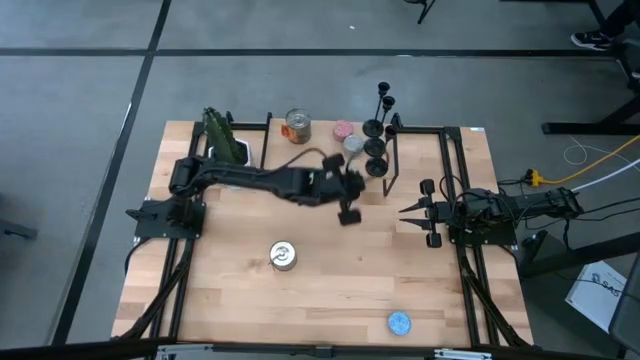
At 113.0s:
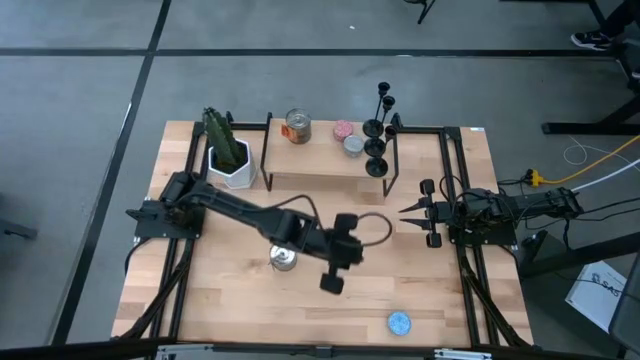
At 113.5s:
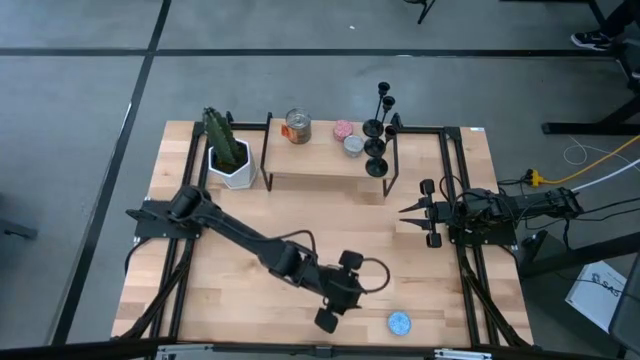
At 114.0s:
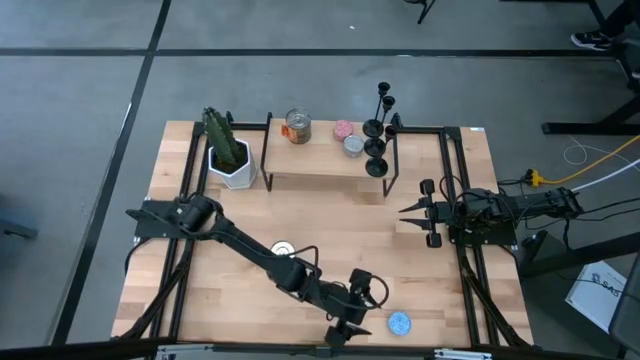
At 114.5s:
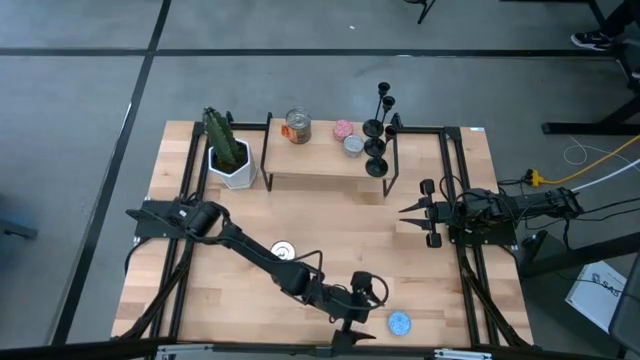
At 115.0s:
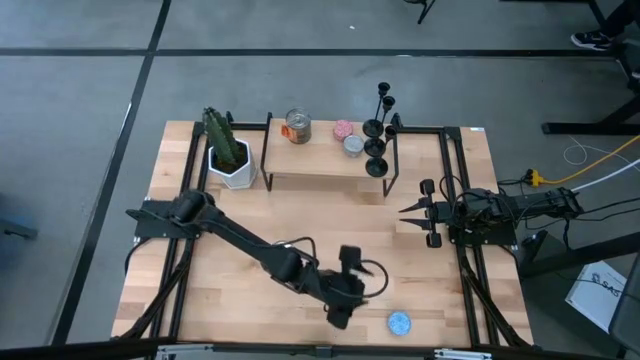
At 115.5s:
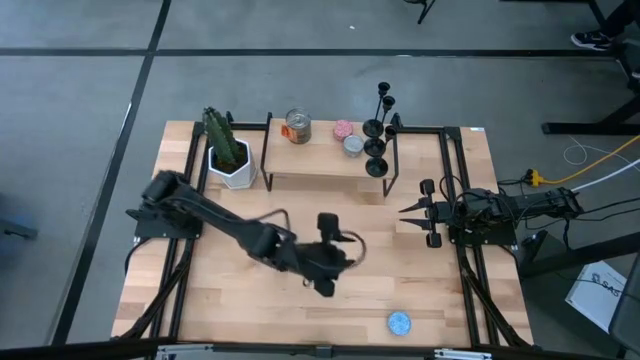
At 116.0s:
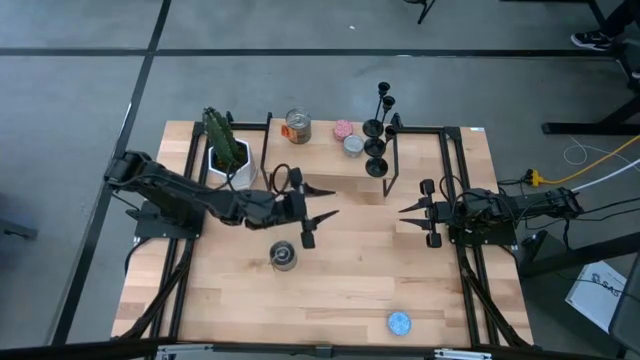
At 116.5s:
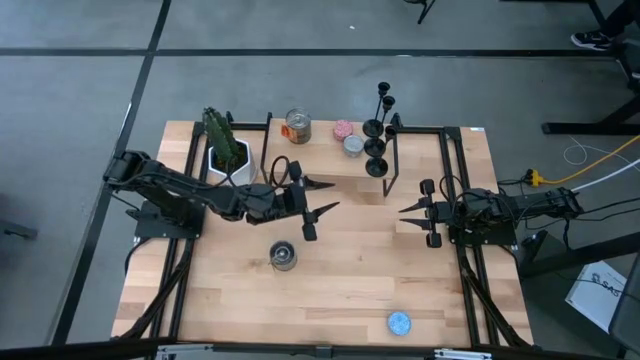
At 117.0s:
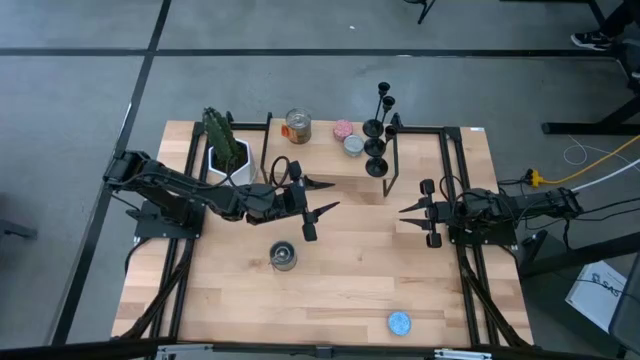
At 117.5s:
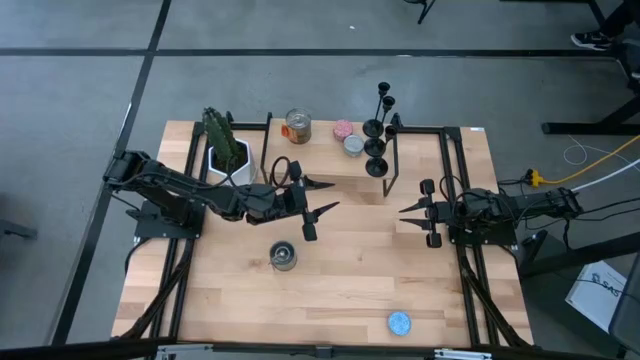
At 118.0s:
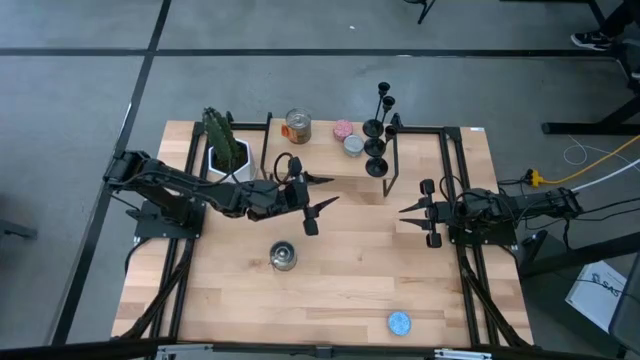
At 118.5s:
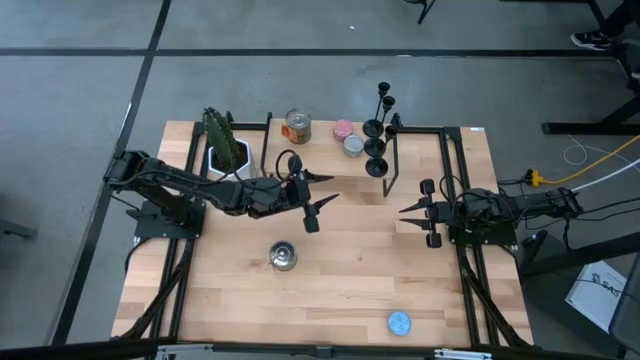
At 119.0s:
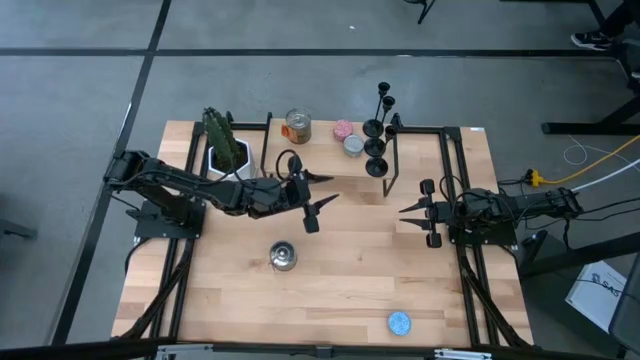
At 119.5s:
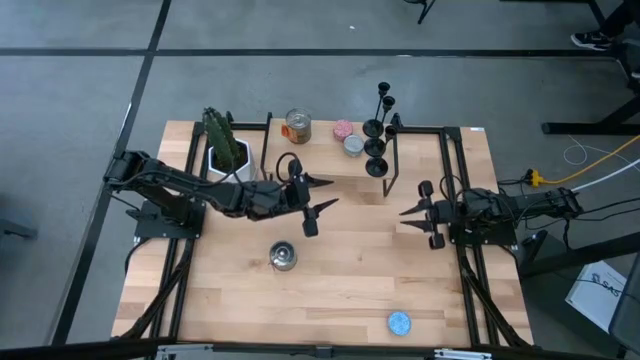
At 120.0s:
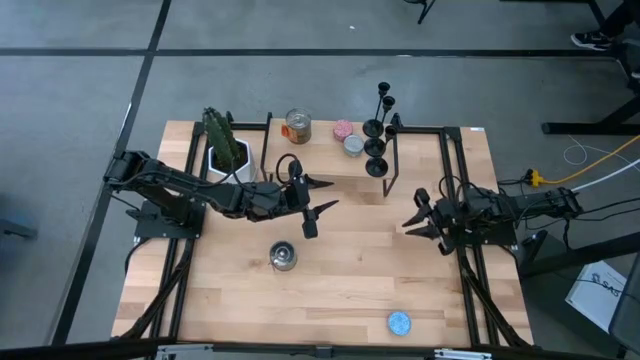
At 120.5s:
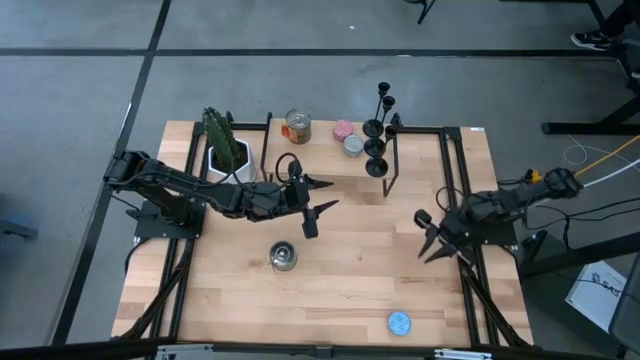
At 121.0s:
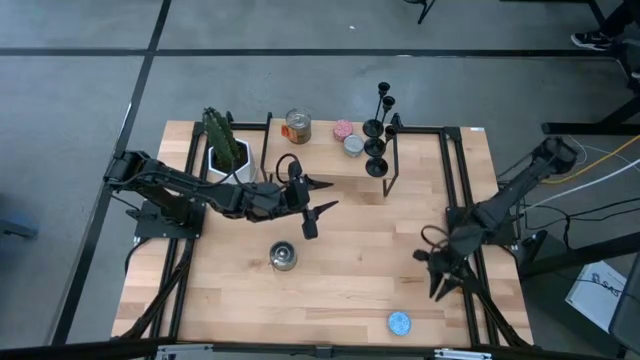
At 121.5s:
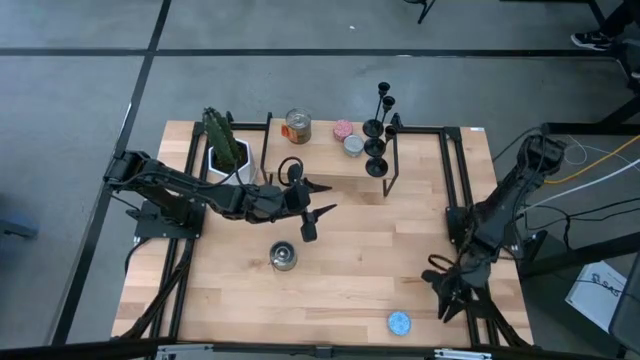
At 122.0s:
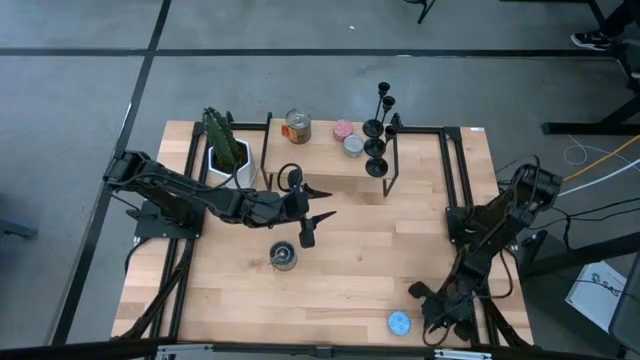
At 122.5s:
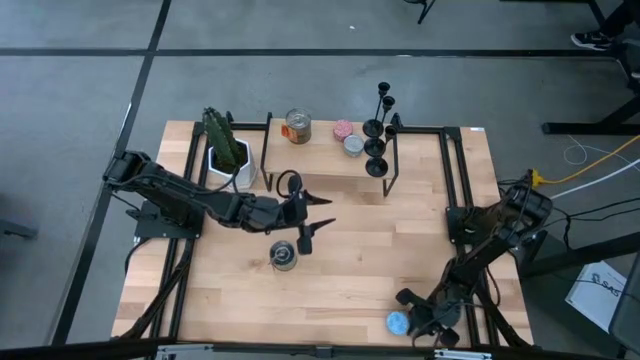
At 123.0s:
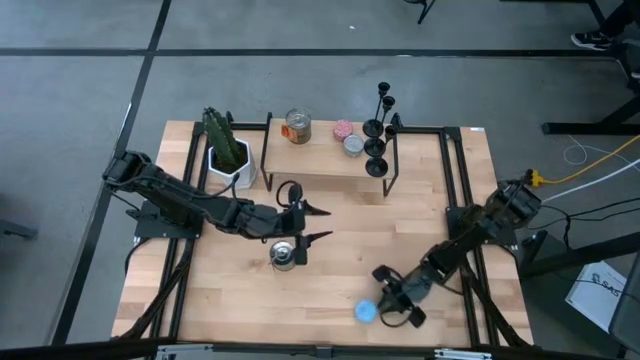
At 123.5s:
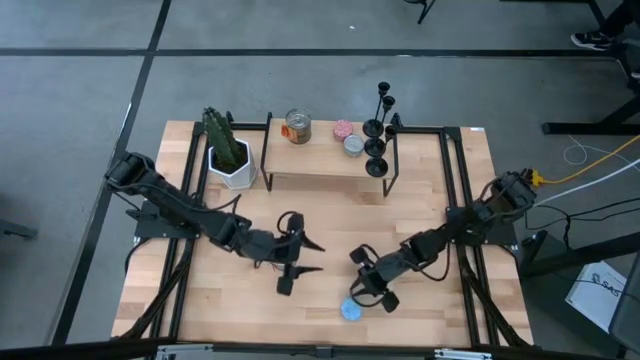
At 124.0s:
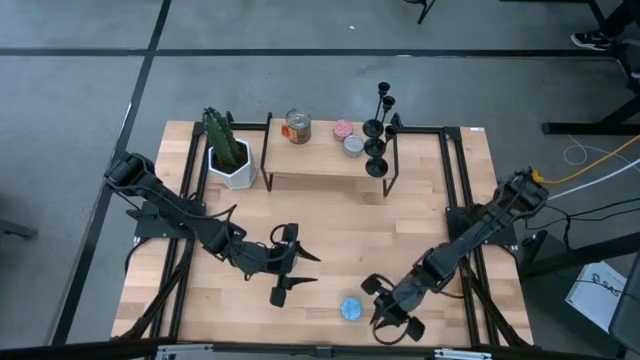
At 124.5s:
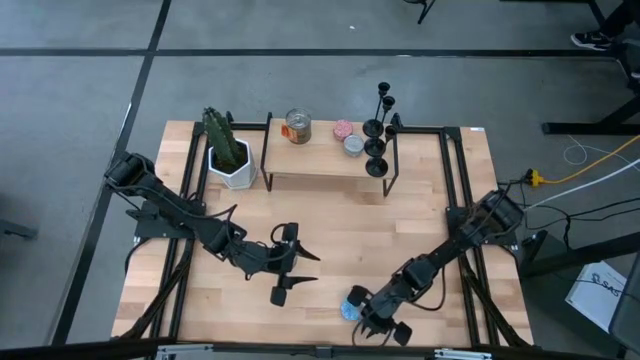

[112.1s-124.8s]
Task: Pick & Place candle stick holders
Put the blue scented candle on the shelf

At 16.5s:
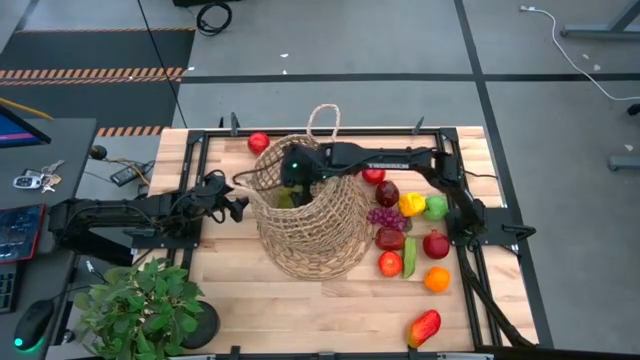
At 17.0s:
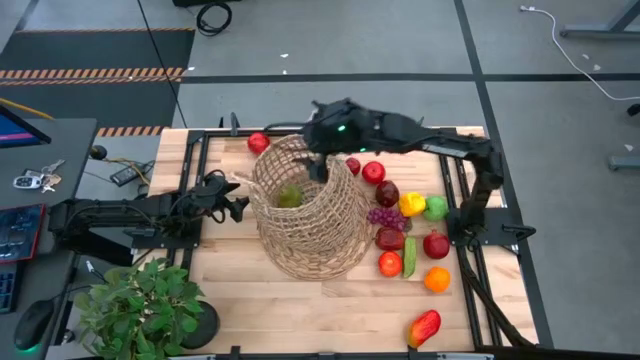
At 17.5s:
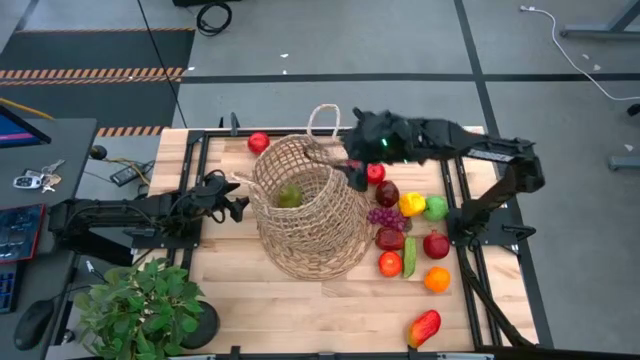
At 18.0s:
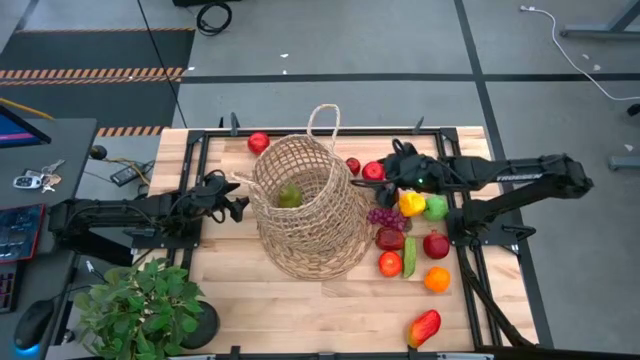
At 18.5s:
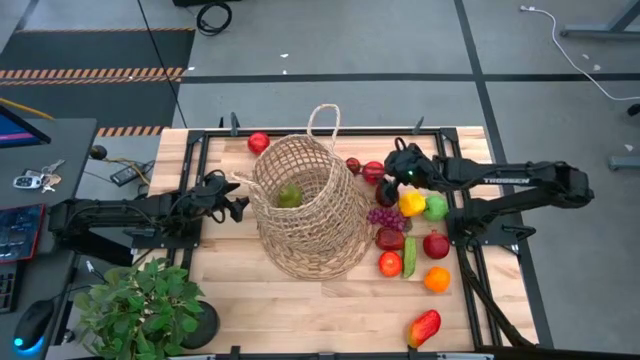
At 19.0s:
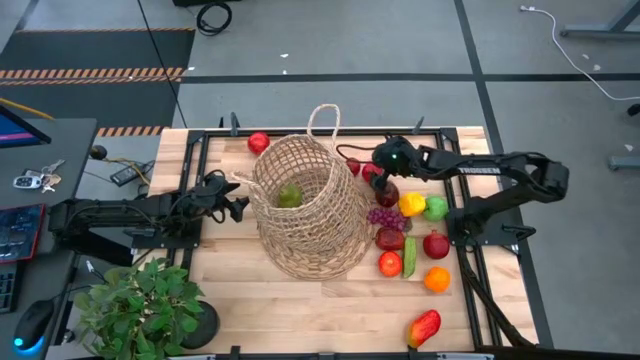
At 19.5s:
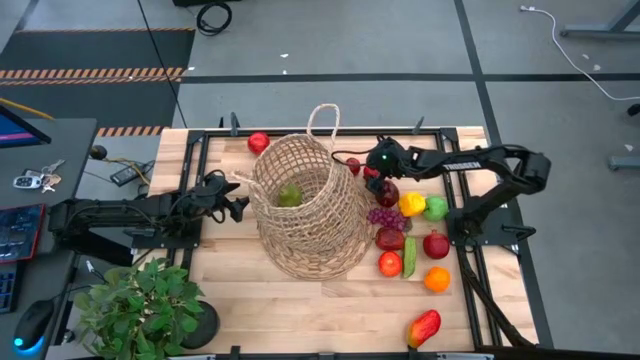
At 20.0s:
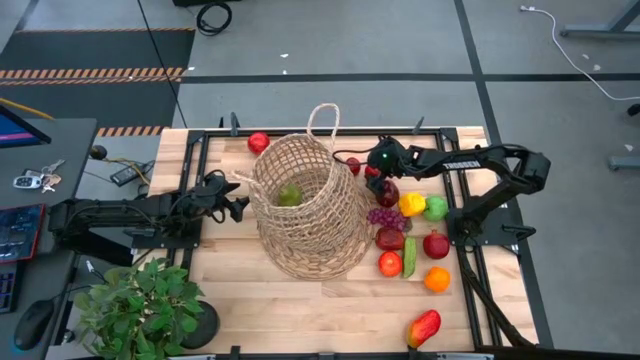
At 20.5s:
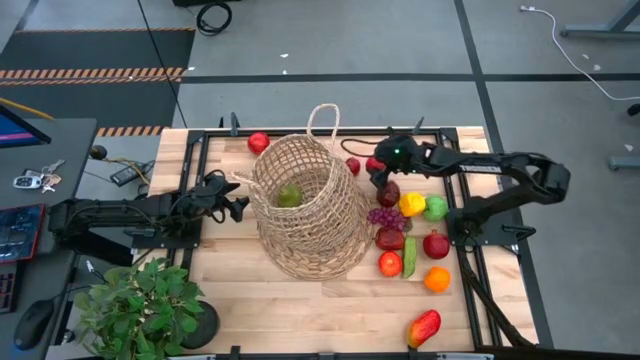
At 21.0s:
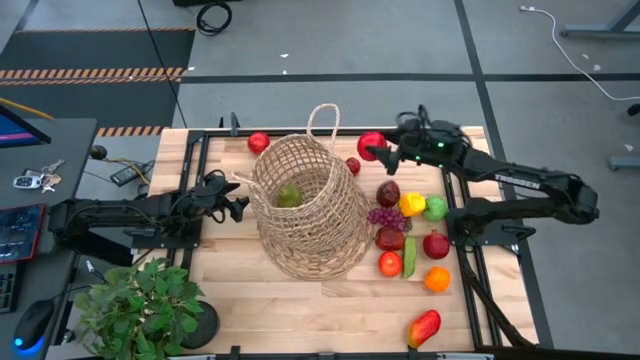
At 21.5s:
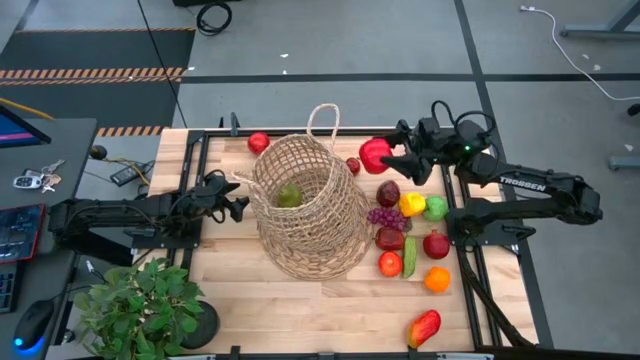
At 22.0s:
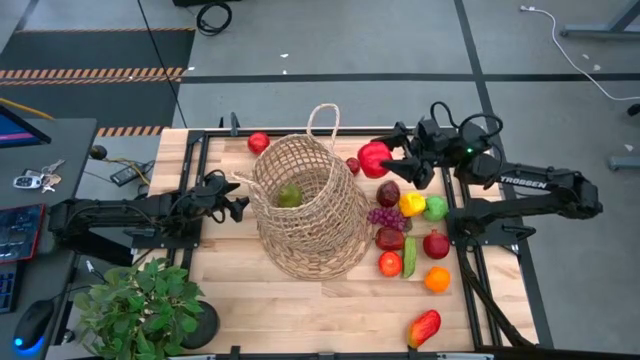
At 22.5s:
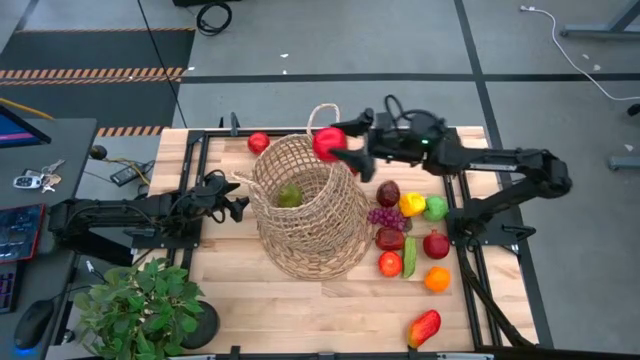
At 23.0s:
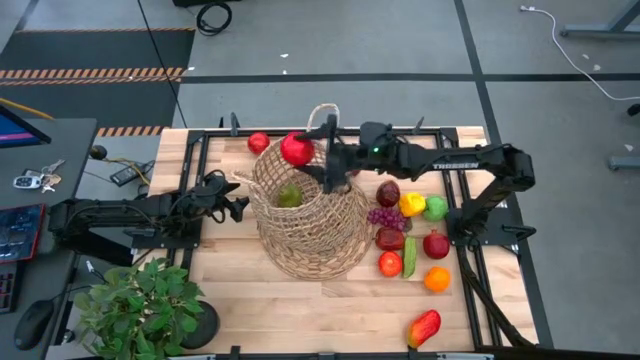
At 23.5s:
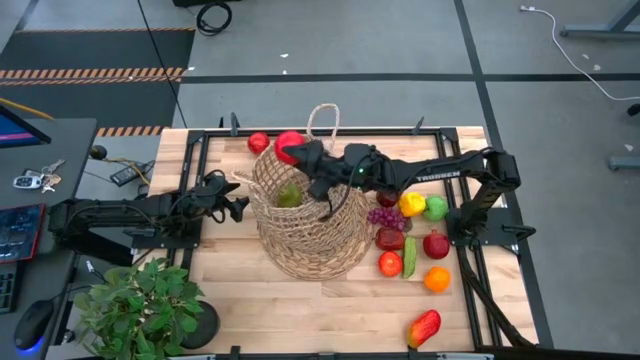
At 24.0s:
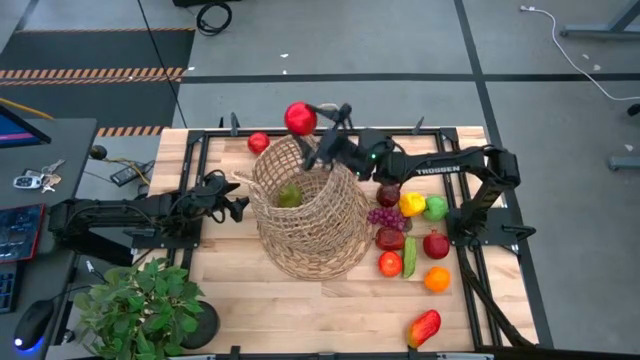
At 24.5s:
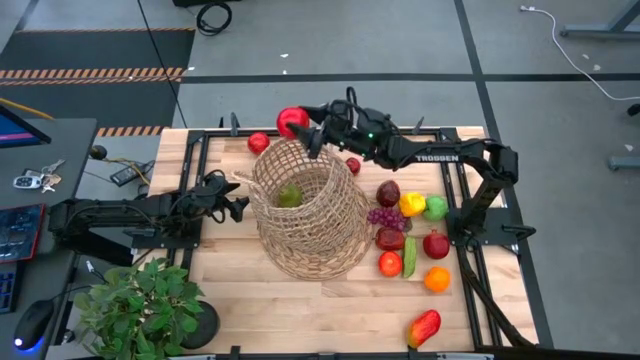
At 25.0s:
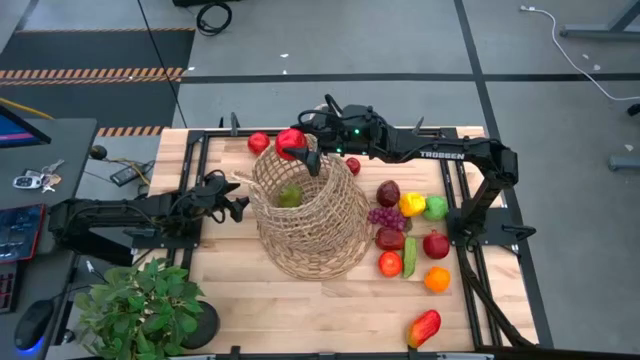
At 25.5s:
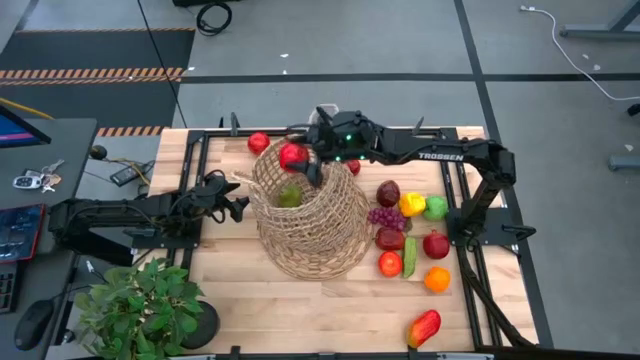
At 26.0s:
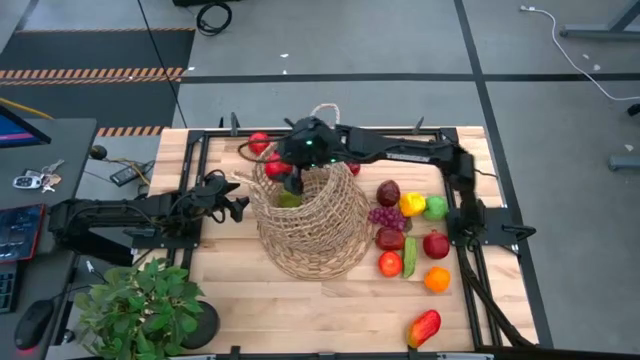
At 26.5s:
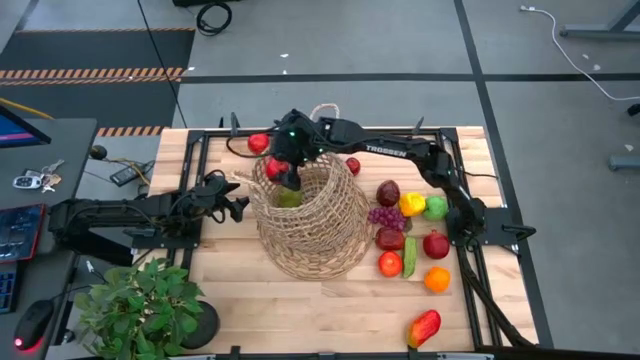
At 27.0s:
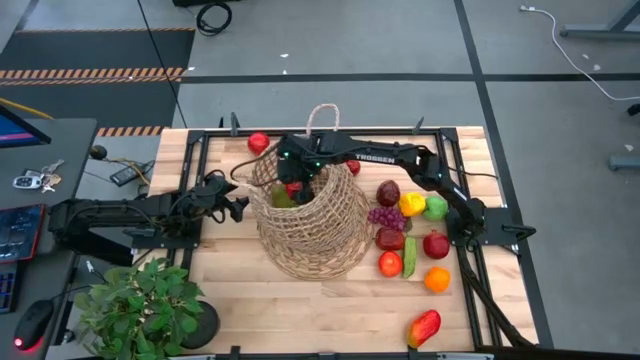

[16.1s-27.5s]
Task: Build produce basket
Put the middle red apple into the basket
